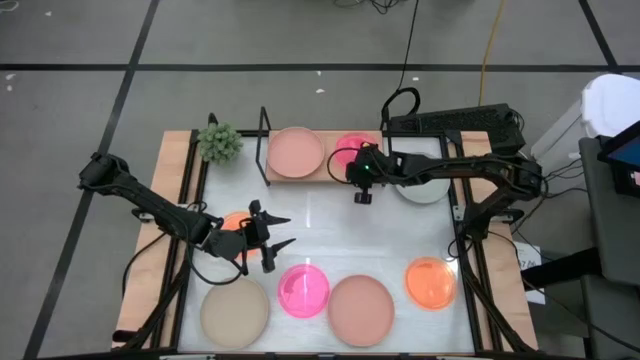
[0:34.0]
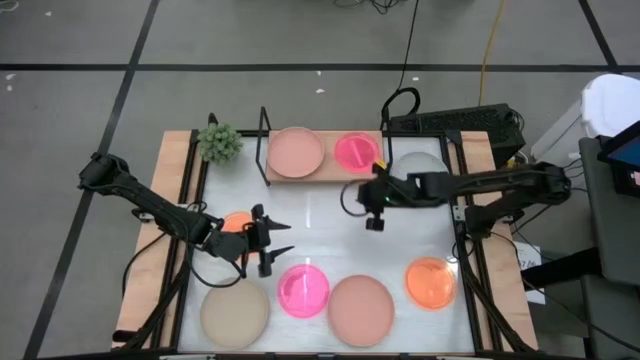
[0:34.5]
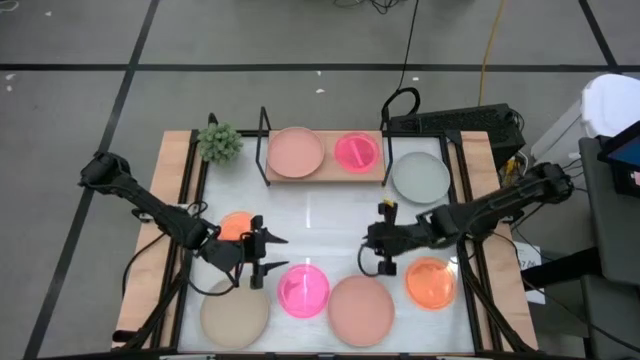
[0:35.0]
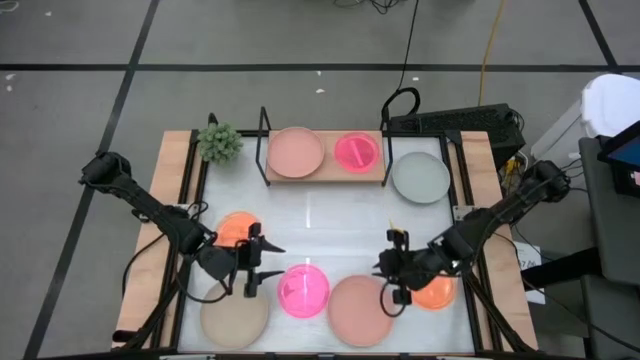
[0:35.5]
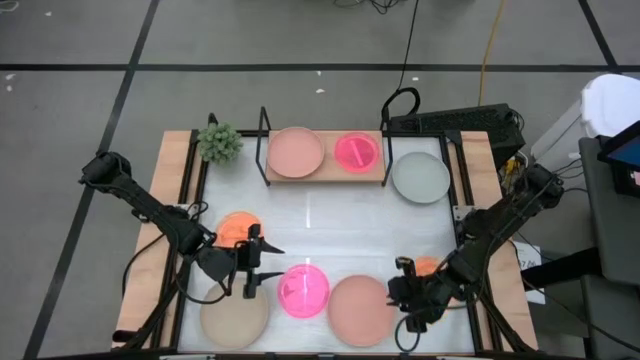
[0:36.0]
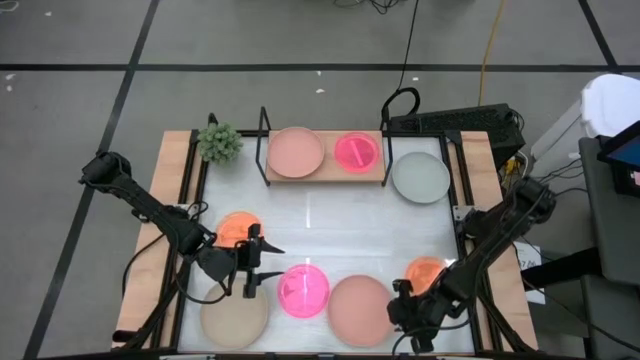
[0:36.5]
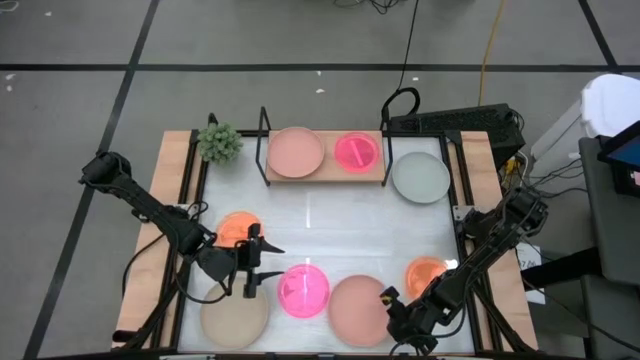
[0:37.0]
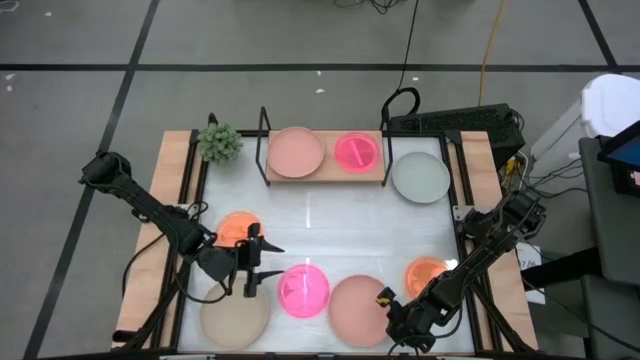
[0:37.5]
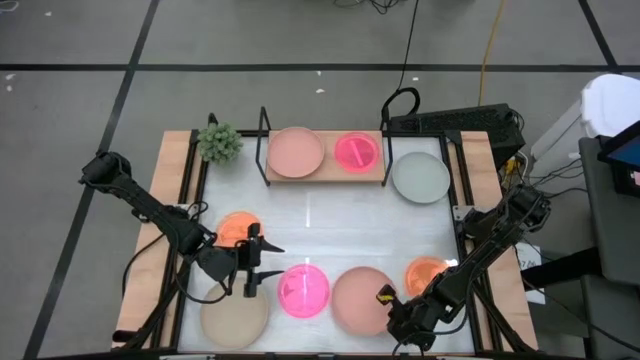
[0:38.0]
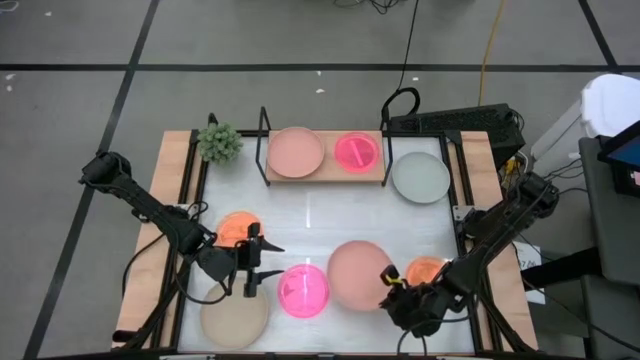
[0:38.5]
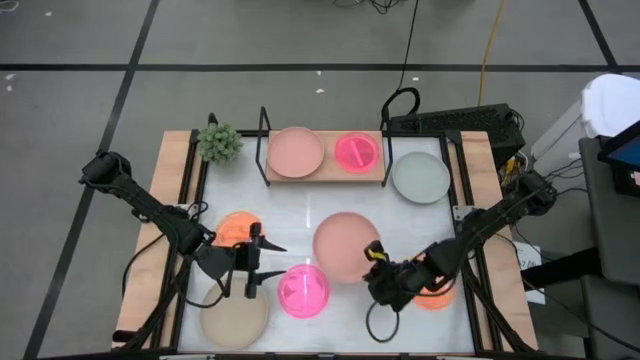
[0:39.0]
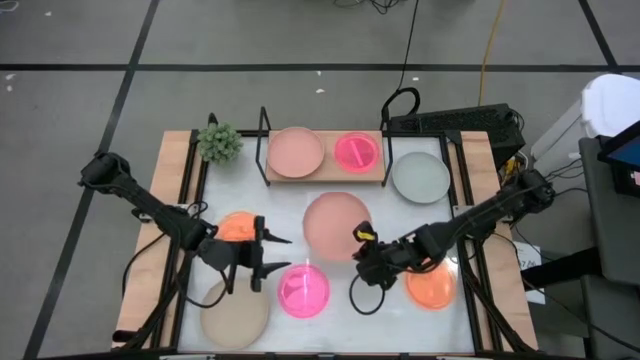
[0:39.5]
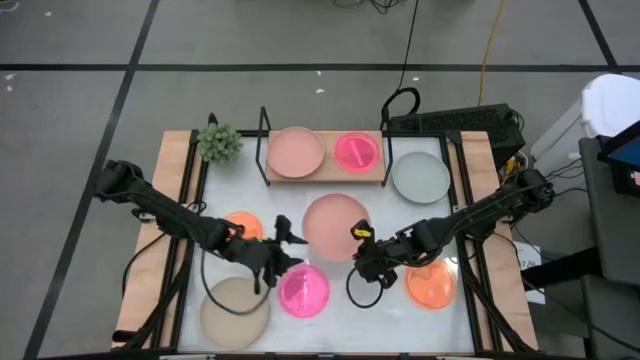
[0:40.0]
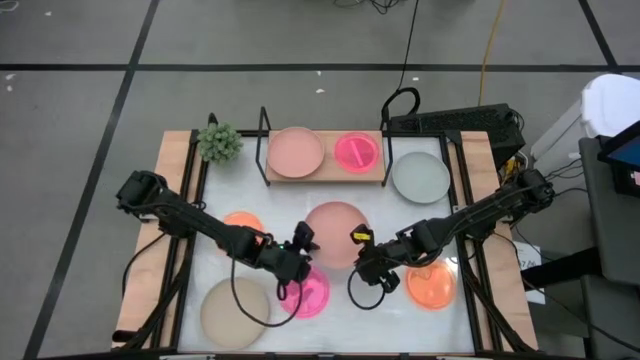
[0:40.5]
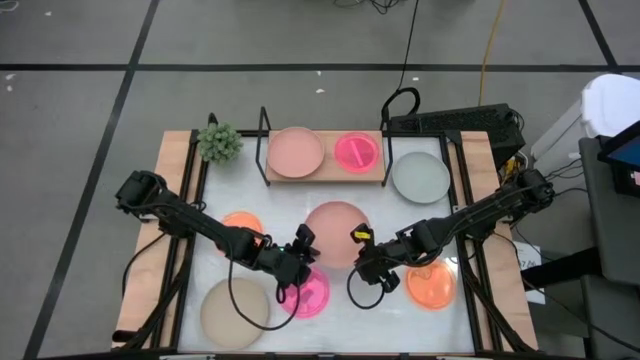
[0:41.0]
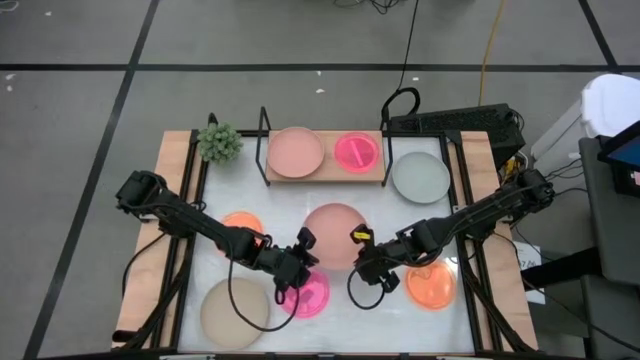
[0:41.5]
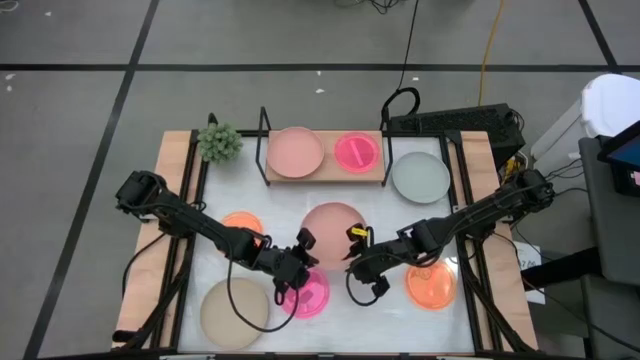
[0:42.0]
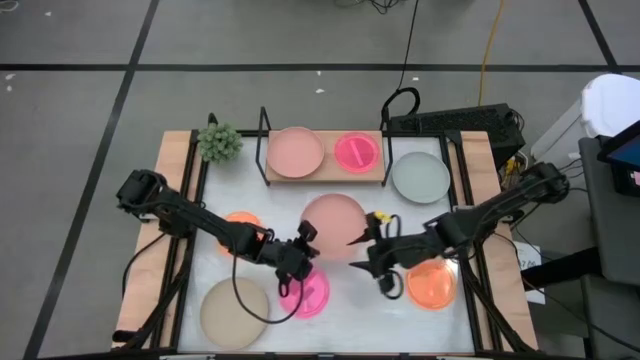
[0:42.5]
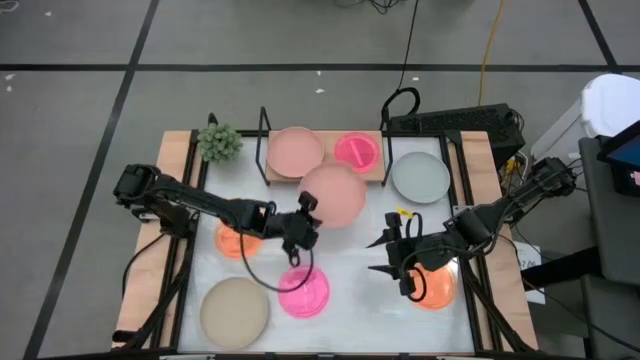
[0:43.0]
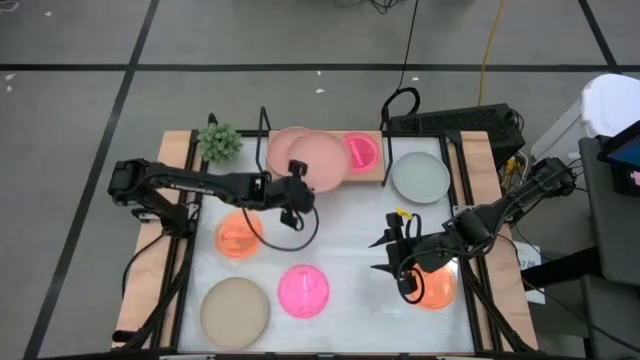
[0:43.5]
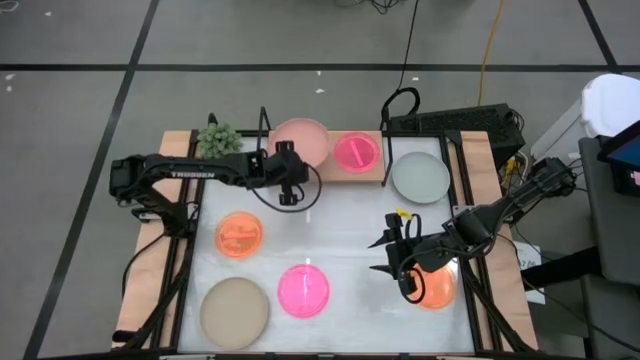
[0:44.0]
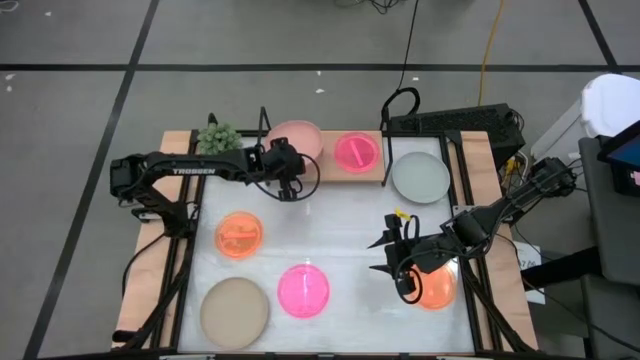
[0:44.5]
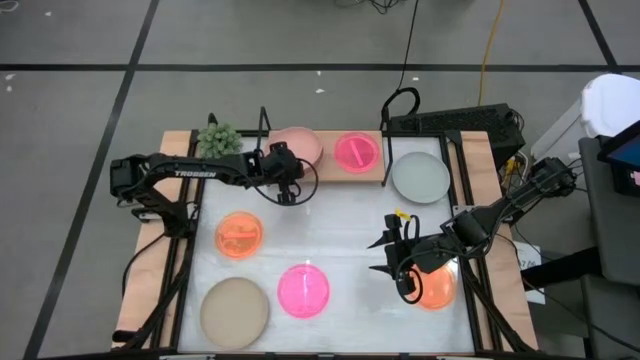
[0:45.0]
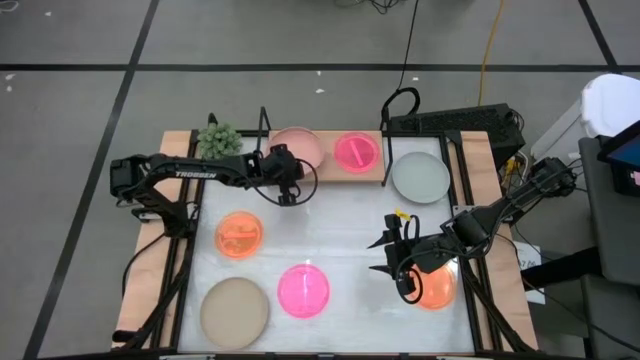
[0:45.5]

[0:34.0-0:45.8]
Task: Place and stack plates onto a shelf
Stack the light orange plate on the light orange plate on the shelf

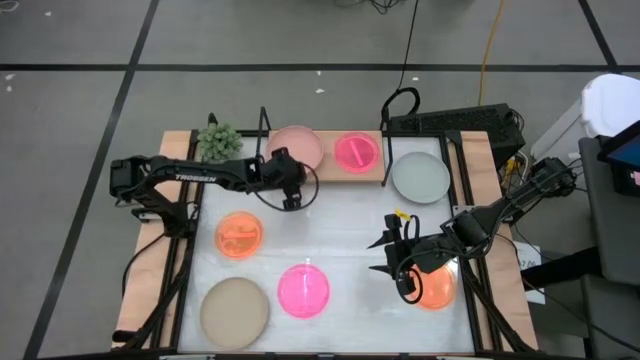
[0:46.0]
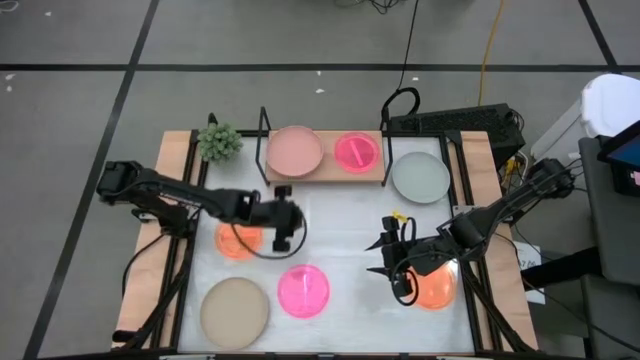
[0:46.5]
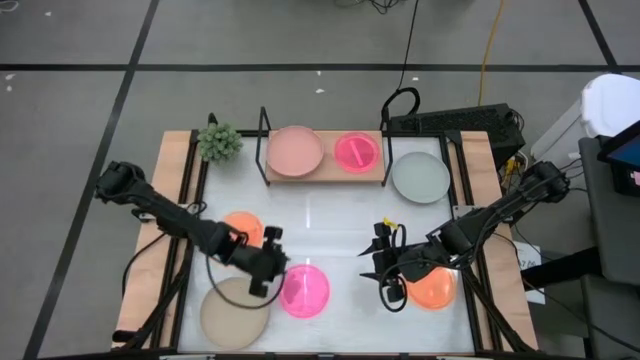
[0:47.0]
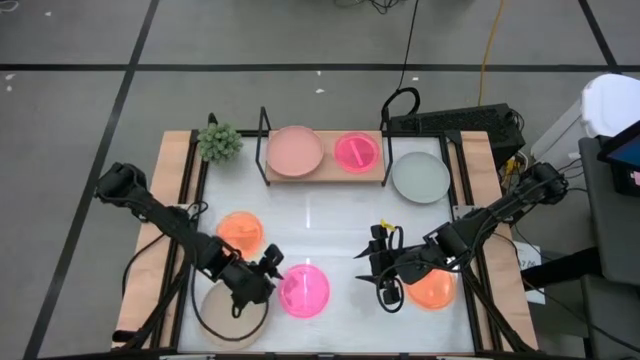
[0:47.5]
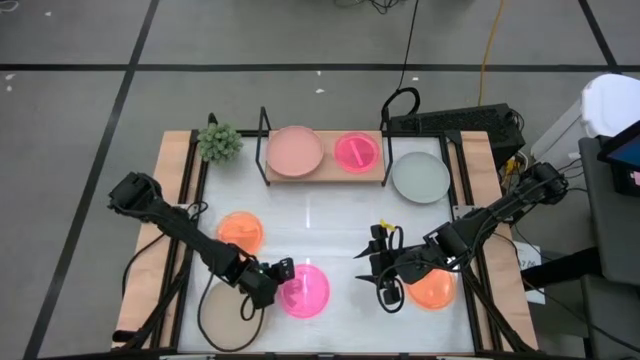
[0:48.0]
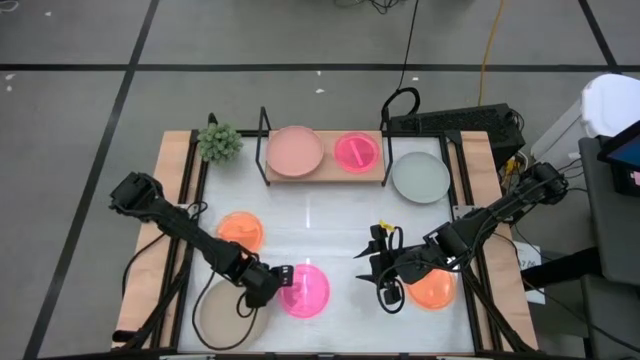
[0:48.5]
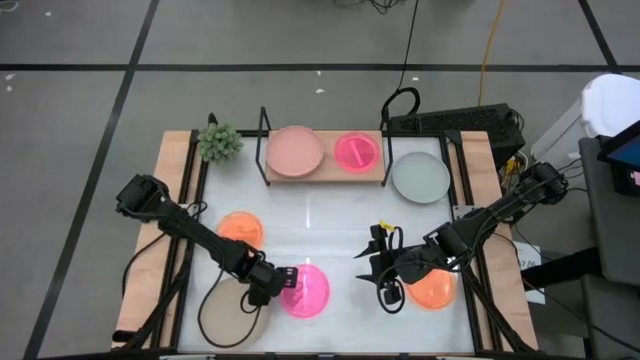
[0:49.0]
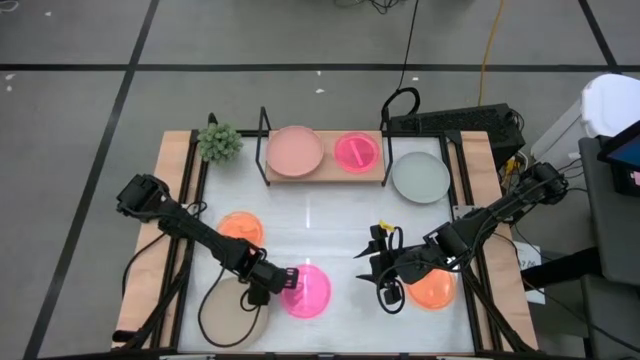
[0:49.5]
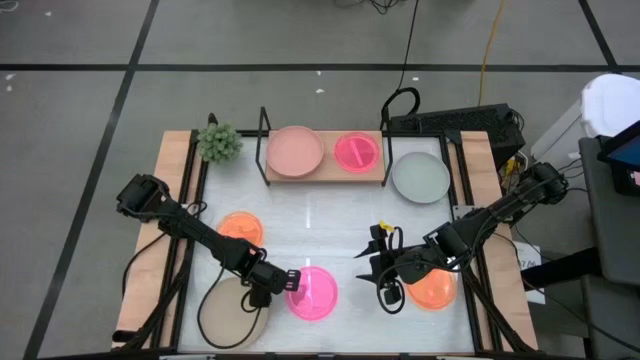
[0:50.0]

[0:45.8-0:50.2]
Stack the pink plate on the pink plate on the shelf

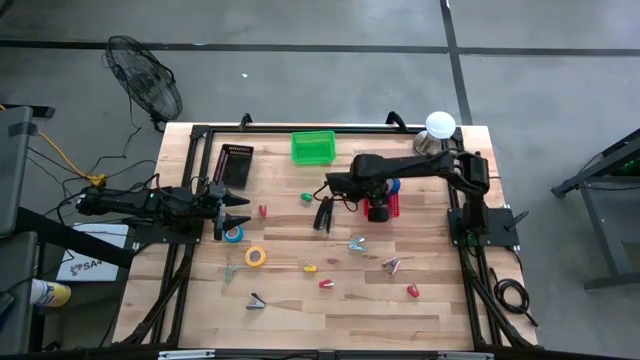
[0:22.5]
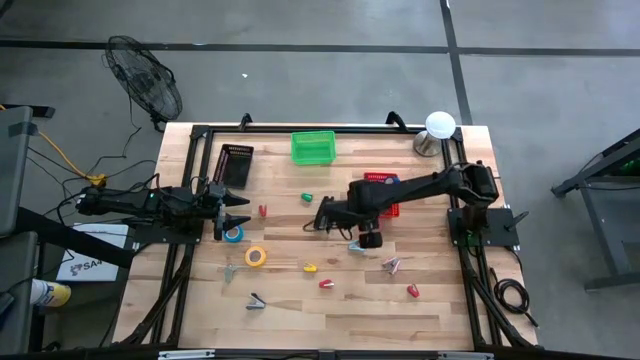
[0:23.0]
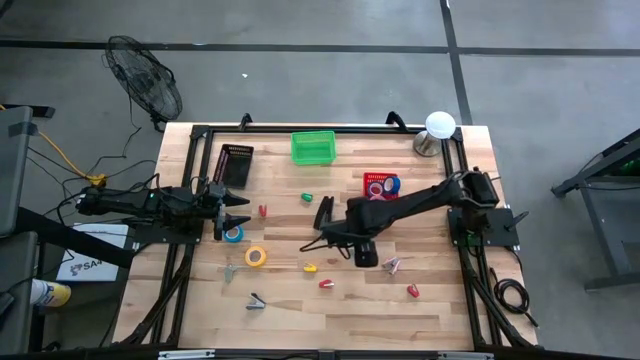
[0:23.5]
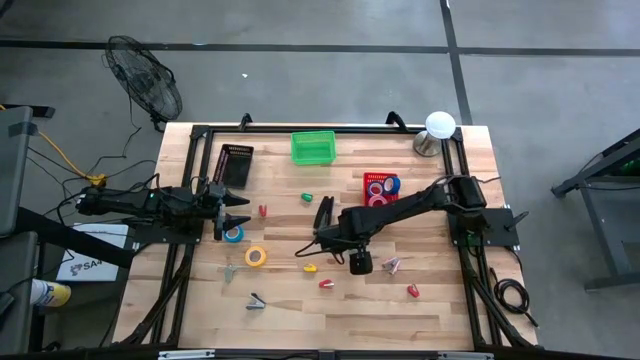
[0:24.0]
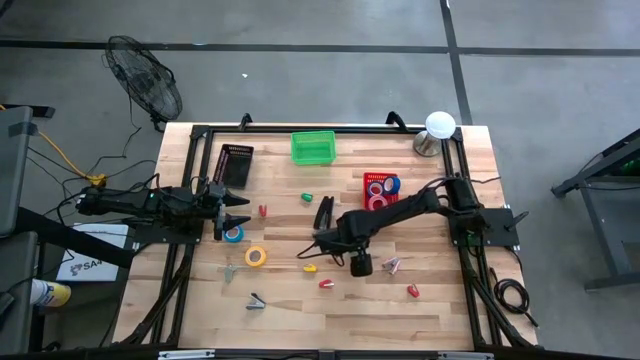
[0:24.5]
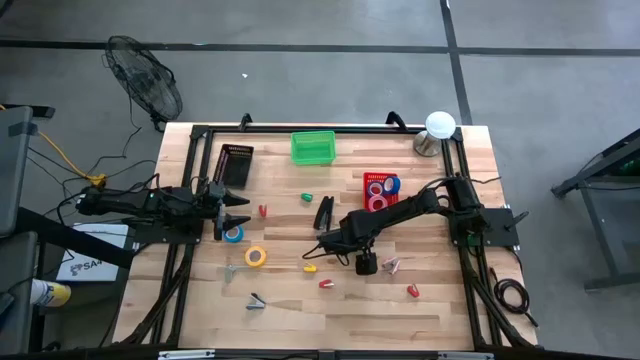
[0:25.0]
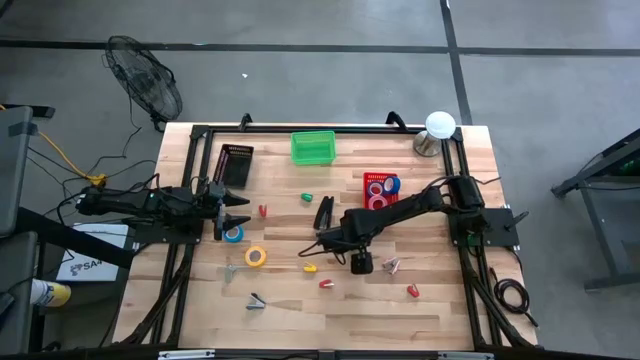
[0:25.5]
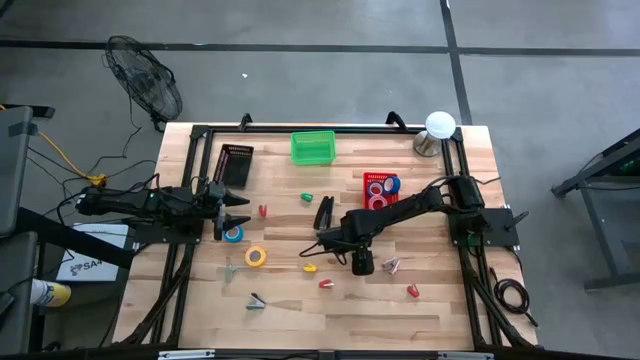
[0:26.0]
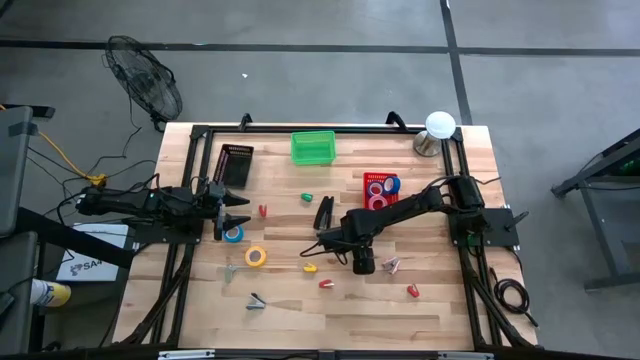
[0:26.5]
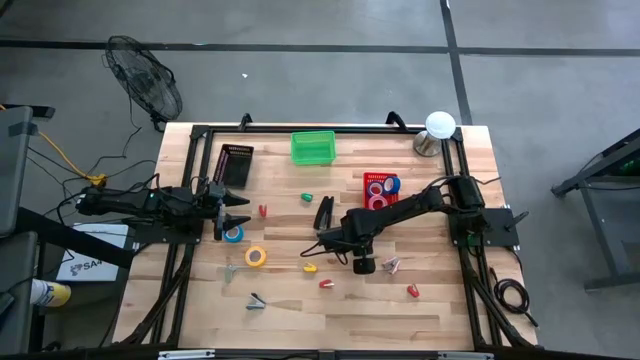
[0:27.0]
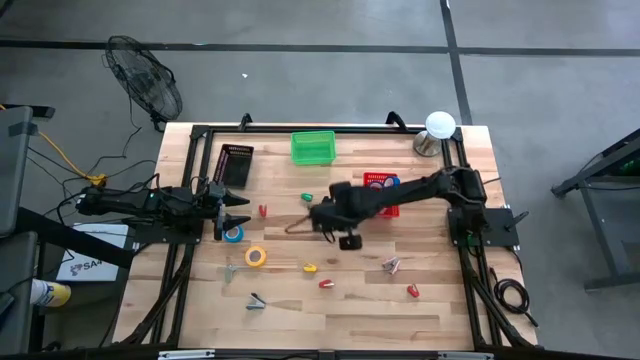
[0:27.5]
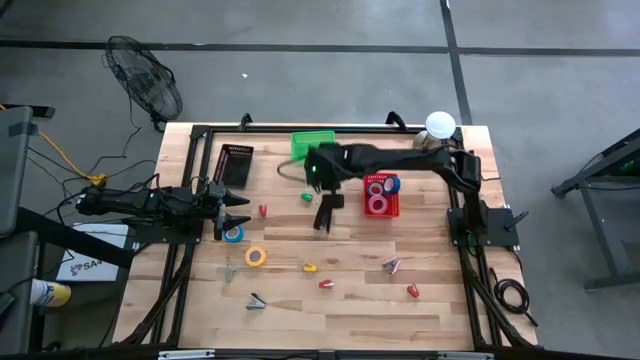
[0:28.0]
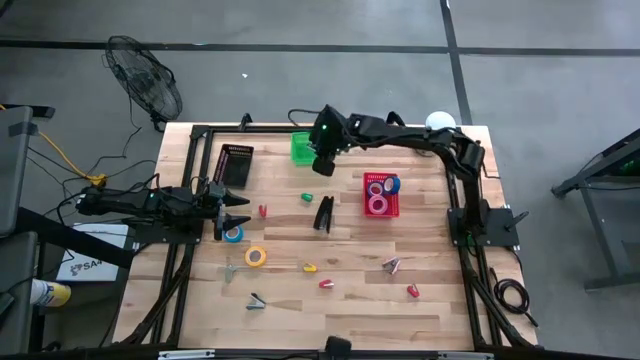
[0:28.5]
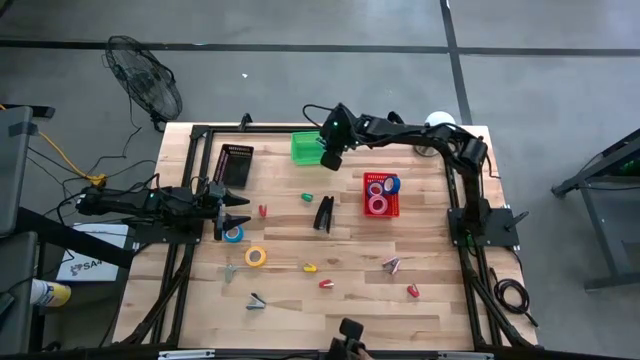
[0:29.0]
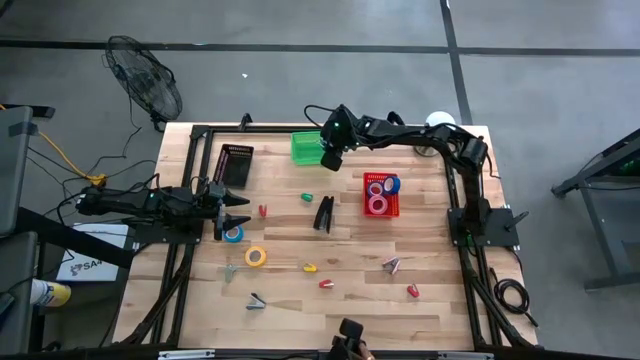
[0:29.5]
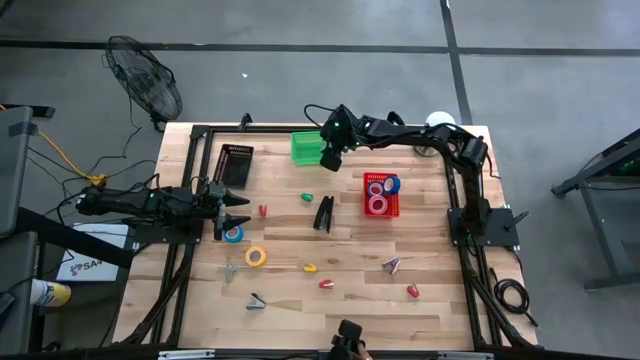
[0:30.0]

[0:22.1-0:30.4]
Task: Pick and place Stapler, Stapler remover, tape
Put the blue staple remover into the green bin
